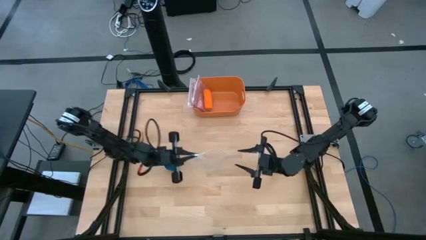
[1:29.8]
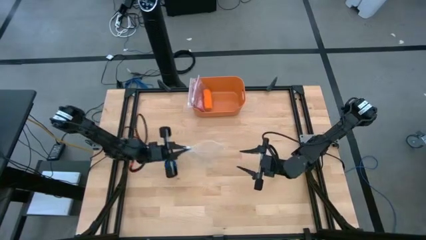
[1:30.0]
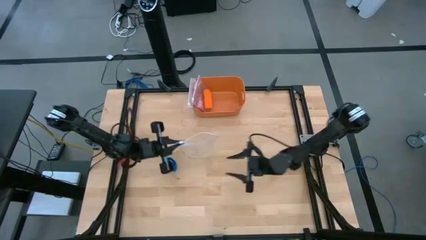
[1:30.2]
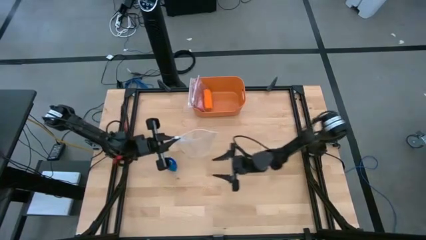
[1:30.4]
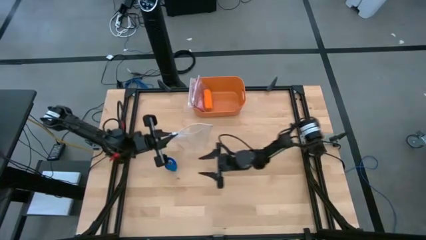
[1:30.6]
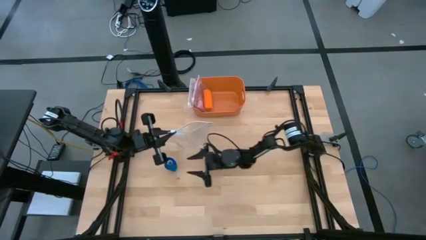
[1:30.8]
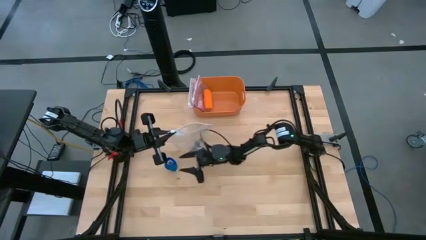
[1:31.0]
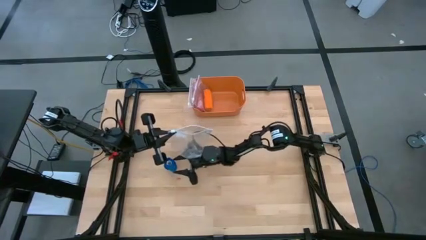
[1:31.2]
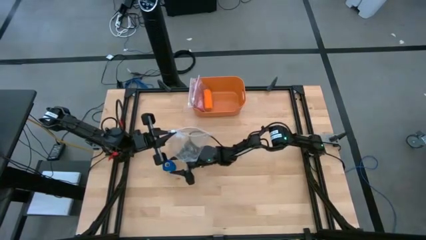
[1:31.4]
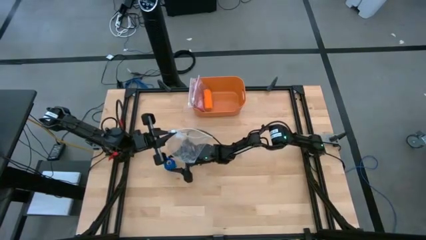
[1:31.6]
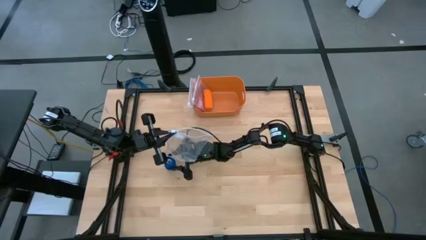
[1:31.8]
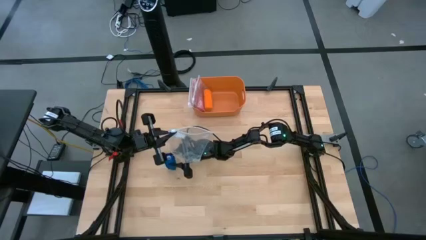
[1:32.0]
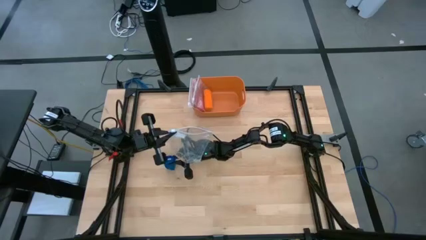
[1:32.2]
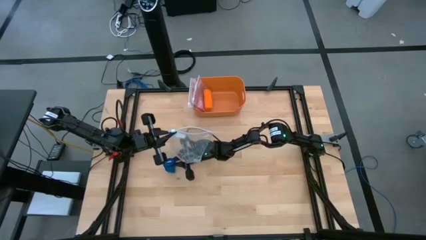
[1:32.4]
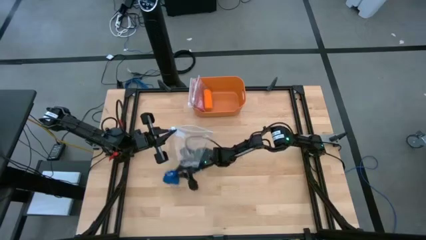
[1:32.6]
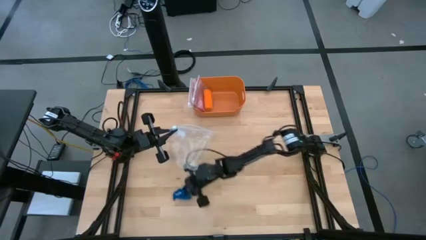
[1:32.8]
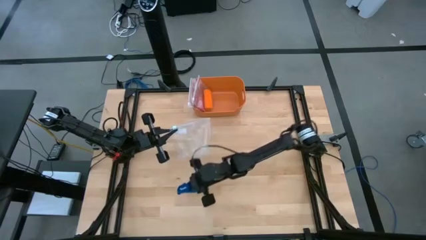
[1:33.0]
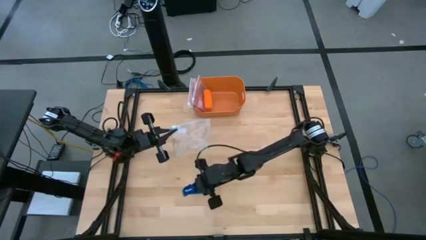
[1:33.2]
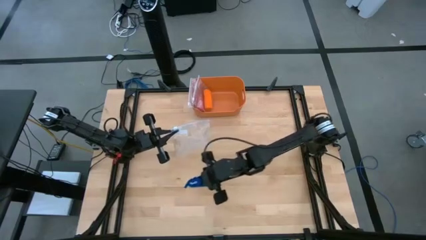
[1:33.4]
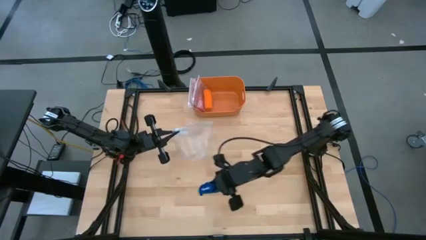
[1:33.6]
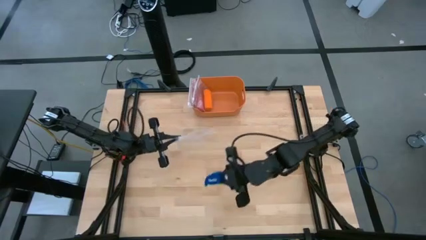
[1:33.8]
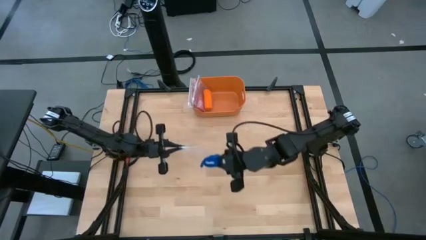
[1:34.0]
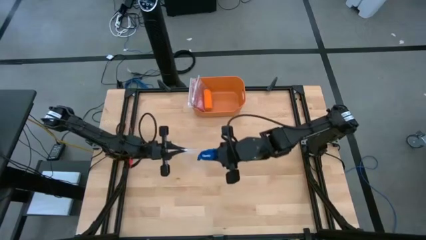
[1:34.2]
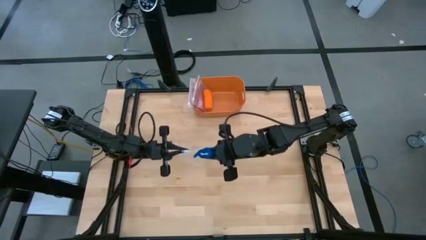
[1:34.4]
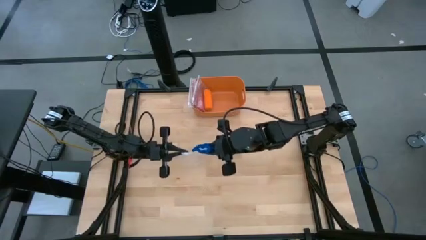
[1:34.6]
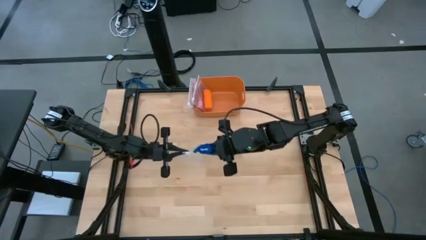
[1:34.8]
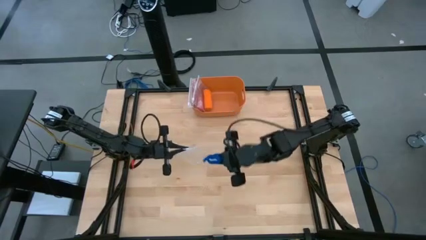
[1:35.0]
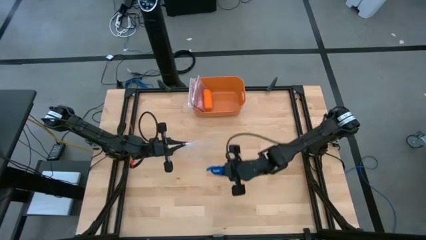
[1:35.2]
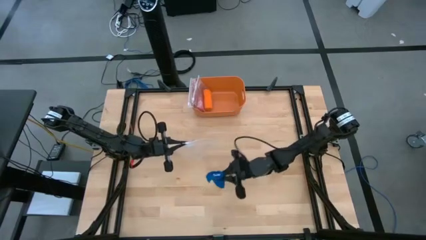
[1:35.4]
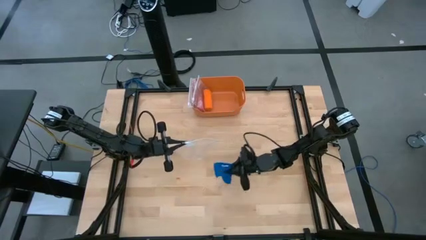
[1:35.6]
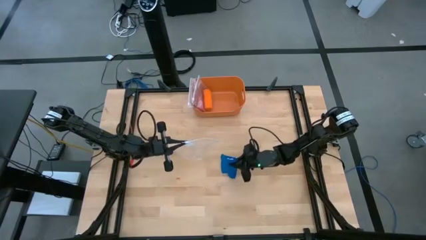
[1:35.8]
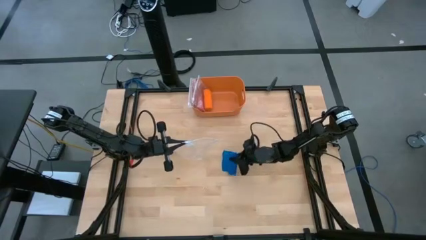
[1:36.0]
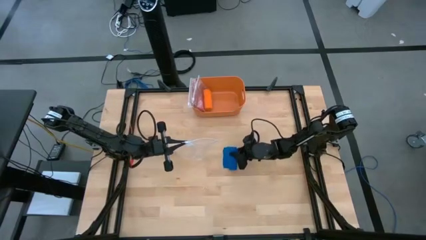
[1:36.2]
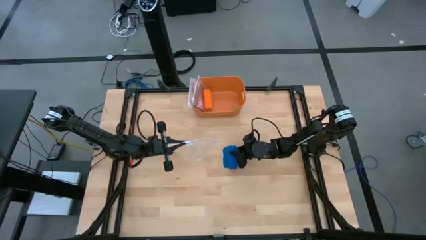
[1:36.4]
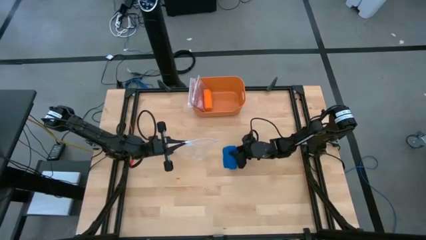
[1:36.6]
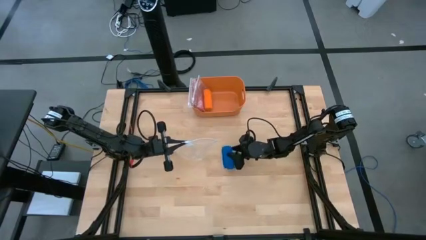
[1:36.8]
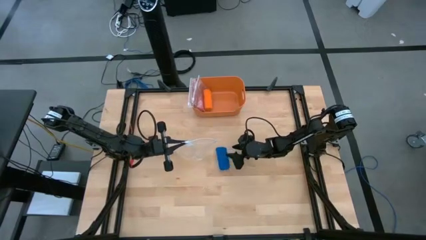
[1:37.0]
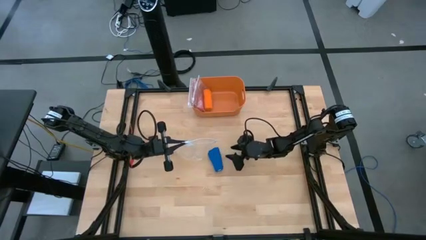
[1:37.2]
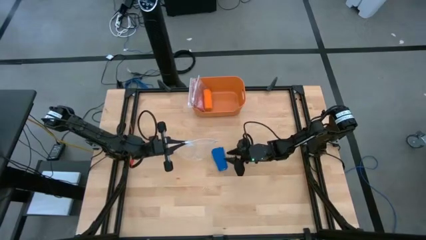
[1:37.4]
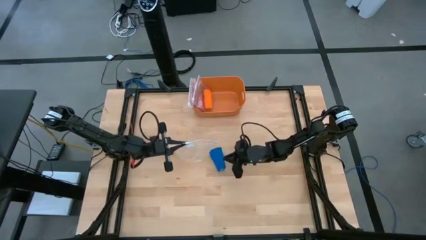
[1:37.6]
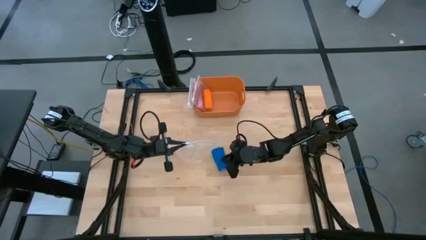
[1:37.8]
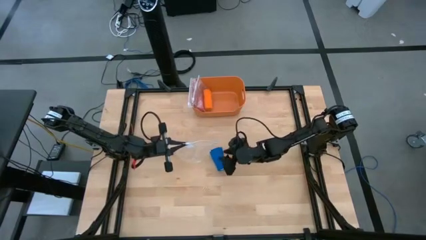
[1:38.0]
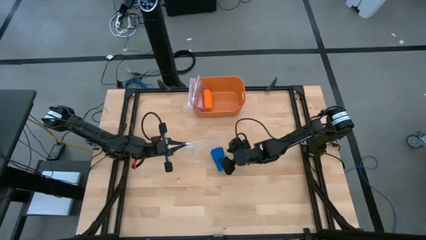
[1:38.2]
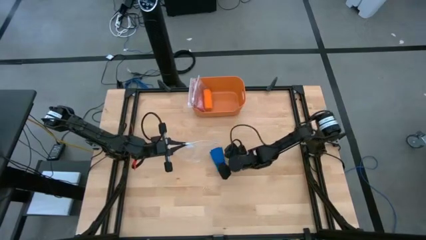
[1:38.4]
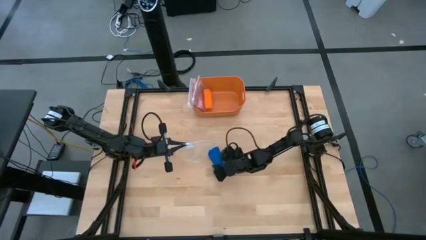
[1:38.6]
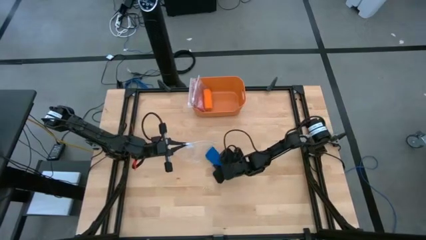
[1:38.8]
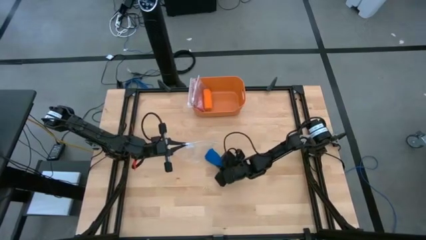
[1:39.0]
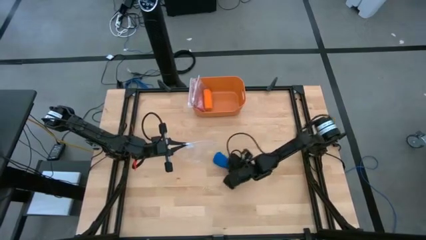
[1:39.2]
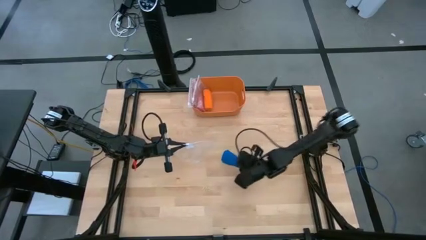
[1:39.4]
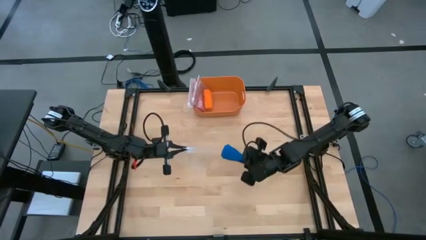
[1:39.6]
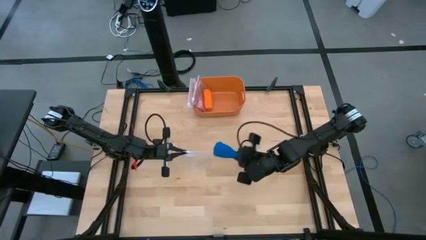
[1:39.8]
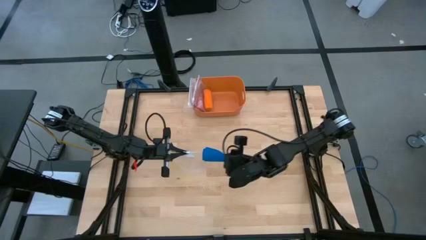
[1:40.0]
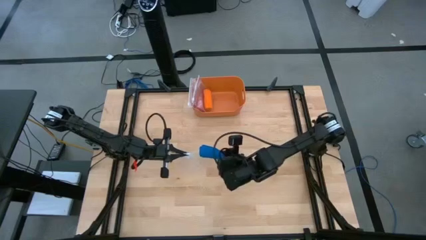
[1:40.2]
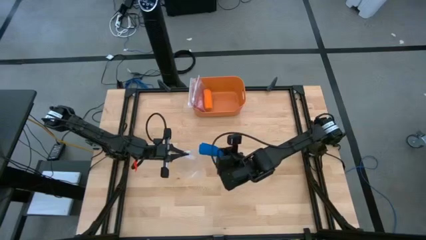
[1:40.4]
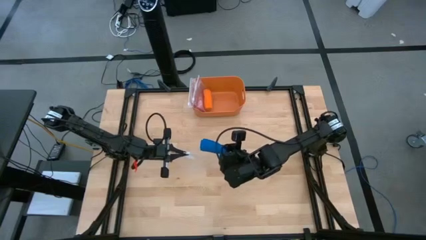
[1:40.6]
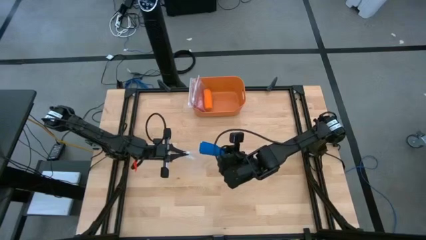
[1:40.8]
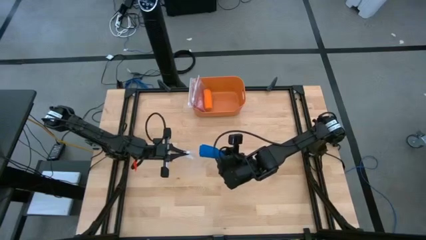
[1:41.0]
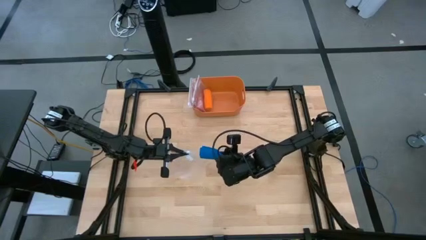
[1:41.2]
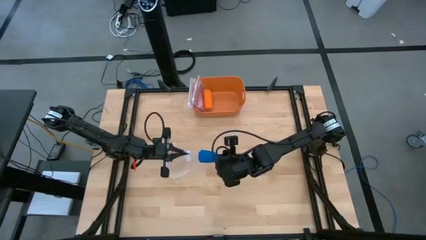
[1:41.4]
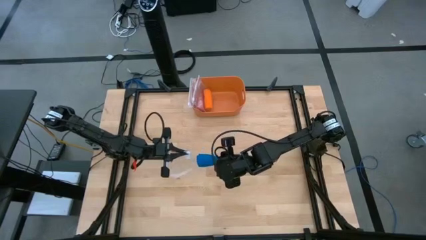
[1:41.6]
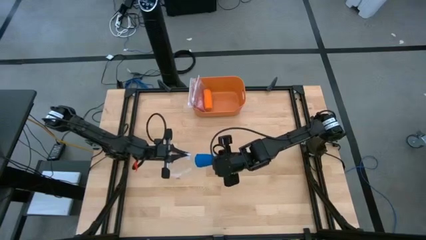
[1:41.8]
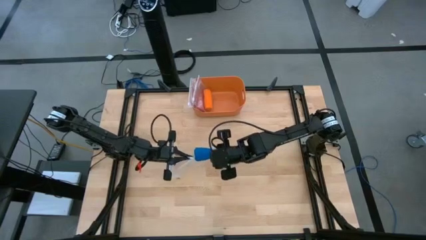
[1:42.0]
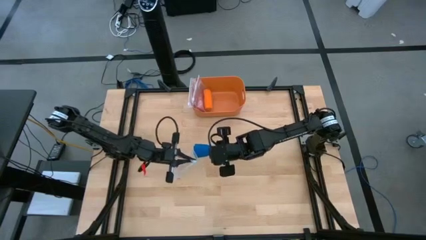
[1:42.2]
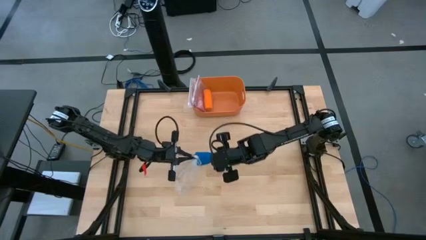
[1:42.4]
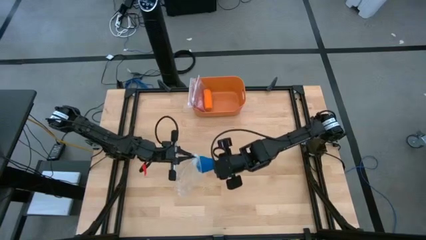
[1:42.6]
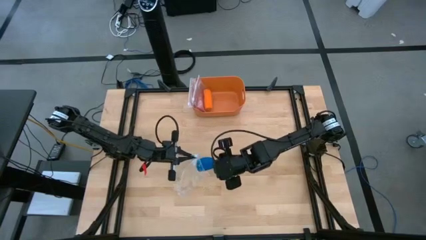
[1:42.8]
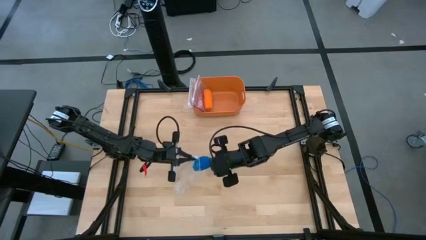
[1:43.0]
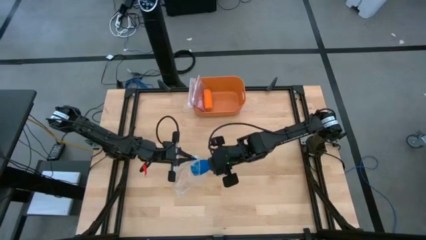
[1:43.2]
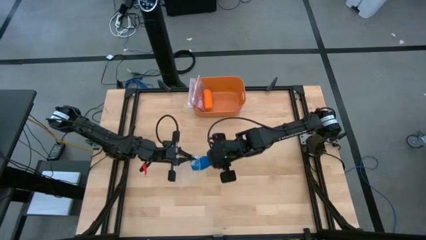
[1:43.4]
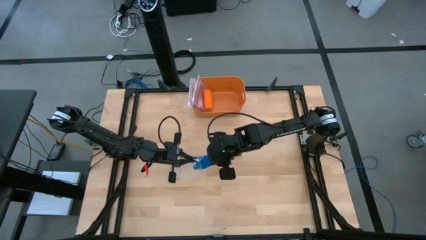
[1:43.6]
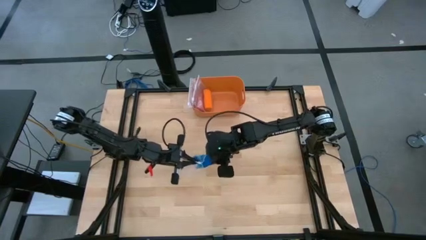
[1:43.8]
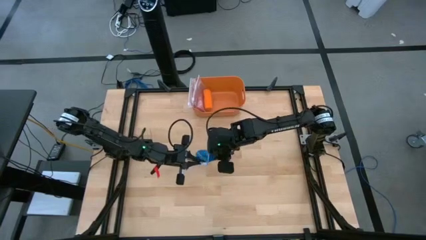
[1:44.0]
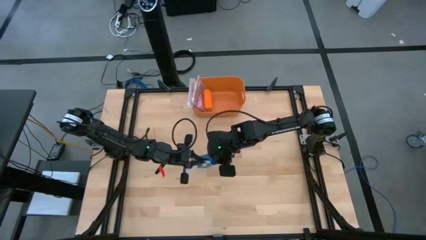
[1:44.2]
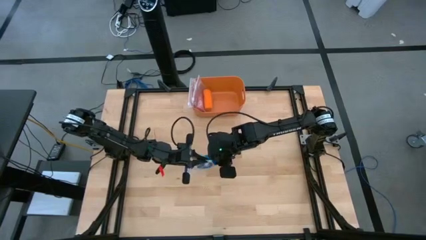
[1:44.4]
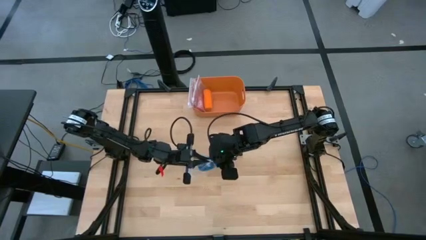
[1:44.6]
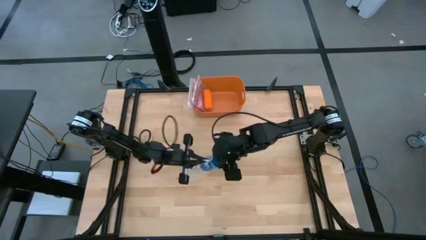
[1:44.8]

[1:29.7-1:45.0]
Task: Roll bandage
Put the blue bandage into the transparent zip bag
